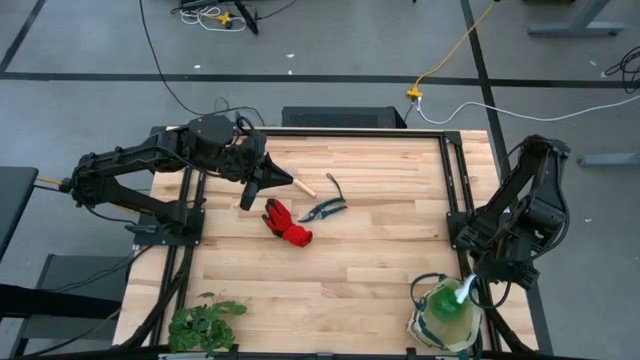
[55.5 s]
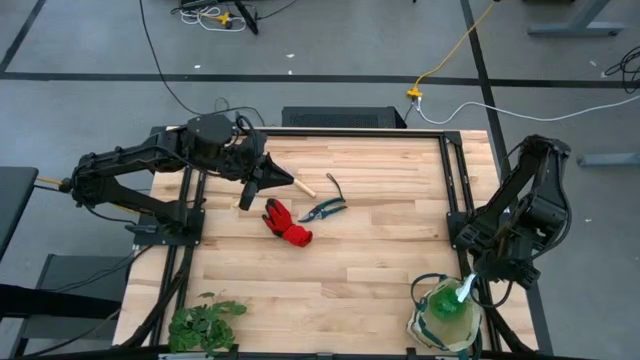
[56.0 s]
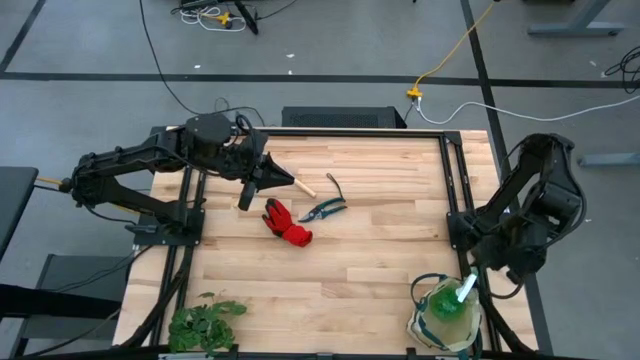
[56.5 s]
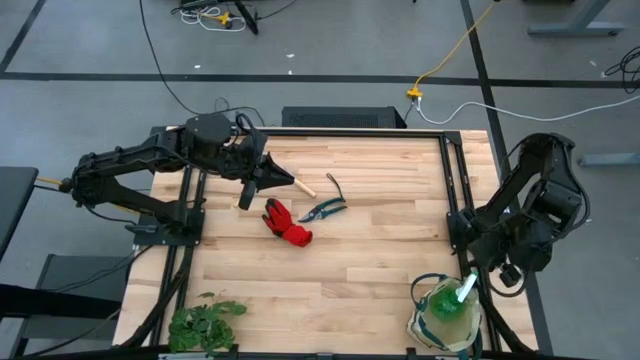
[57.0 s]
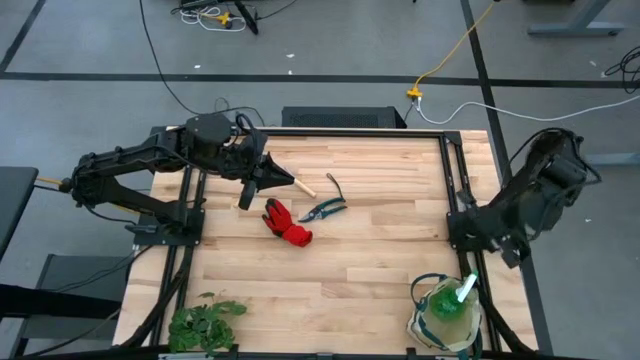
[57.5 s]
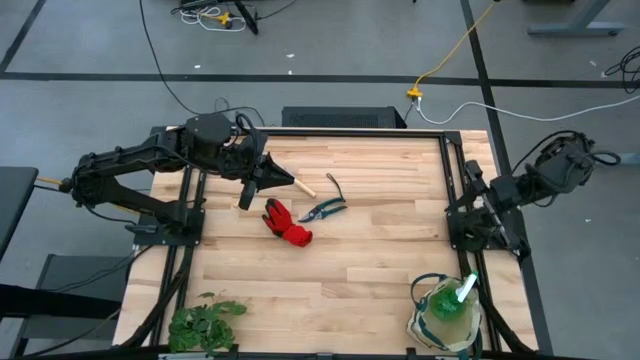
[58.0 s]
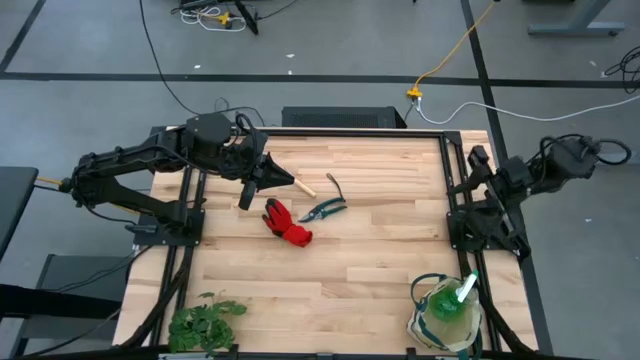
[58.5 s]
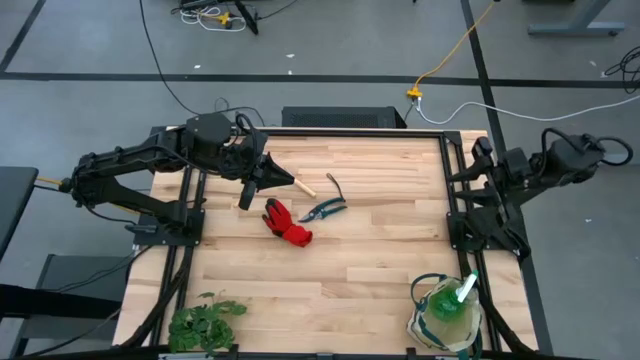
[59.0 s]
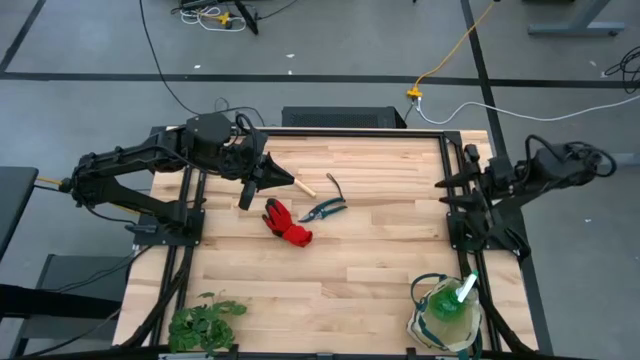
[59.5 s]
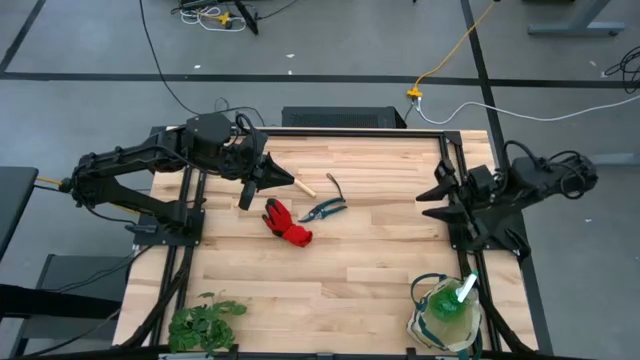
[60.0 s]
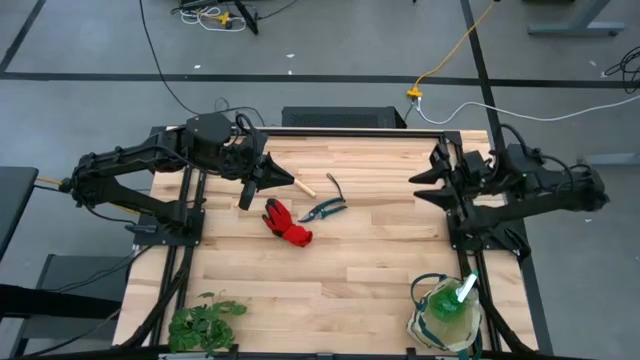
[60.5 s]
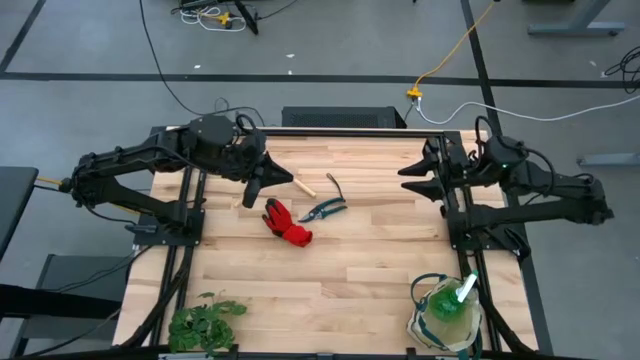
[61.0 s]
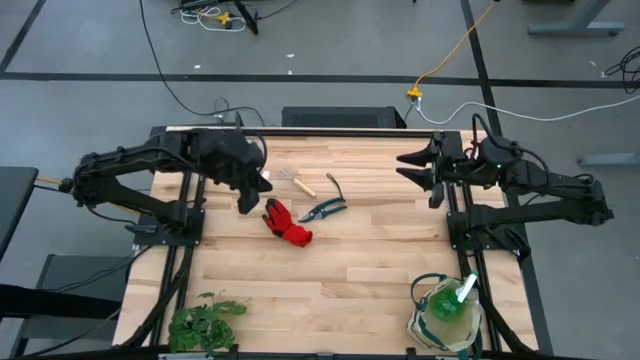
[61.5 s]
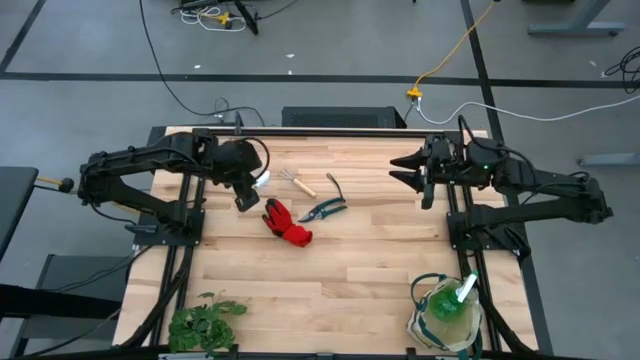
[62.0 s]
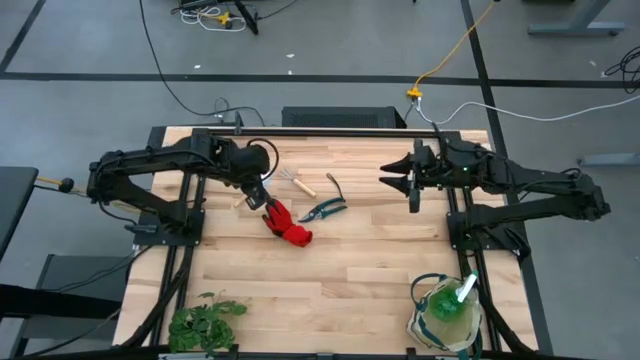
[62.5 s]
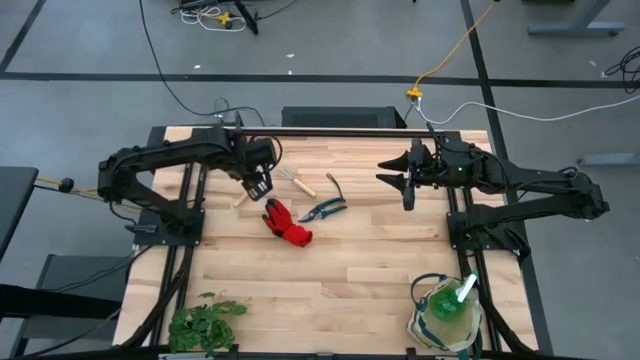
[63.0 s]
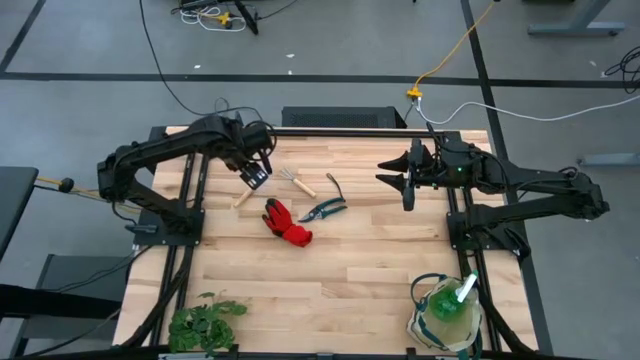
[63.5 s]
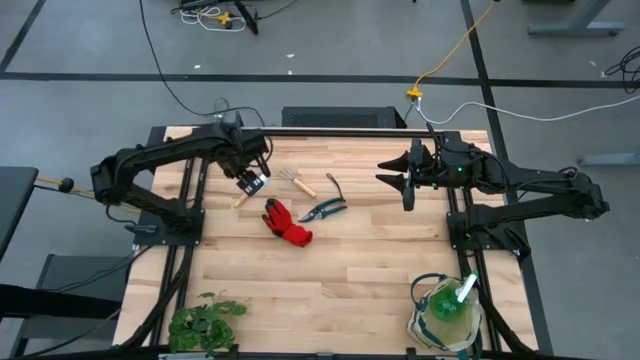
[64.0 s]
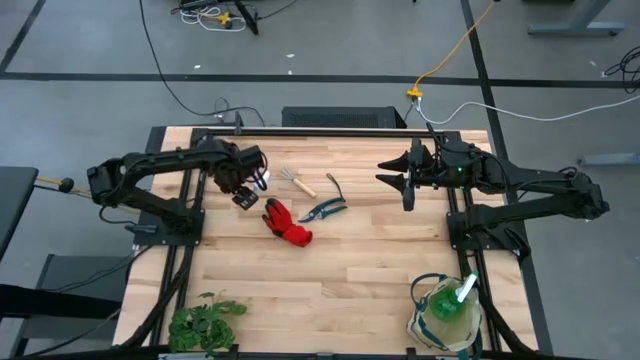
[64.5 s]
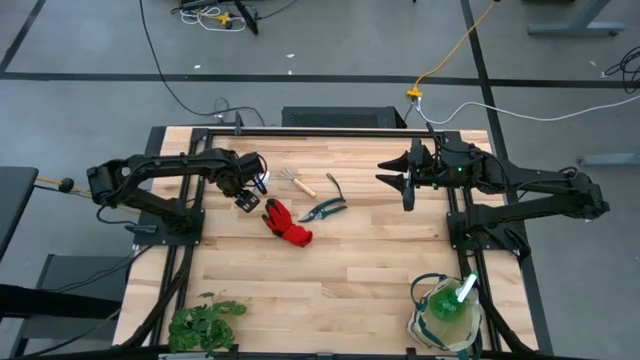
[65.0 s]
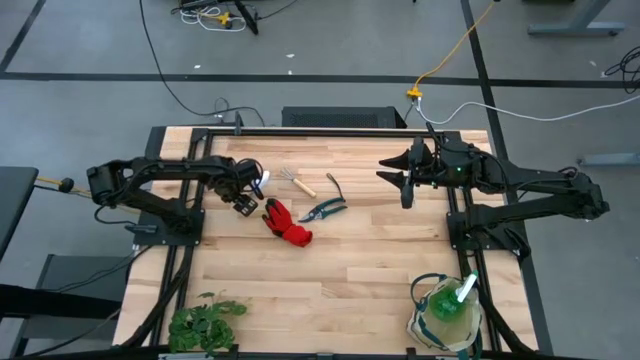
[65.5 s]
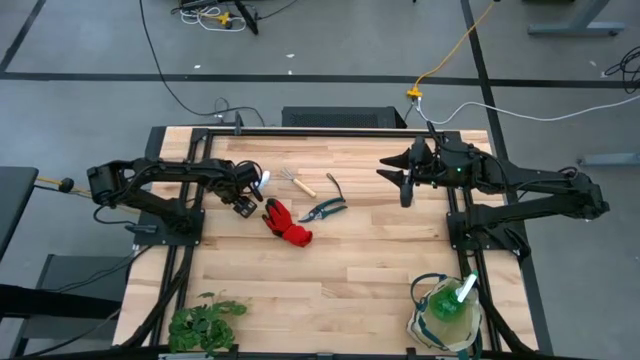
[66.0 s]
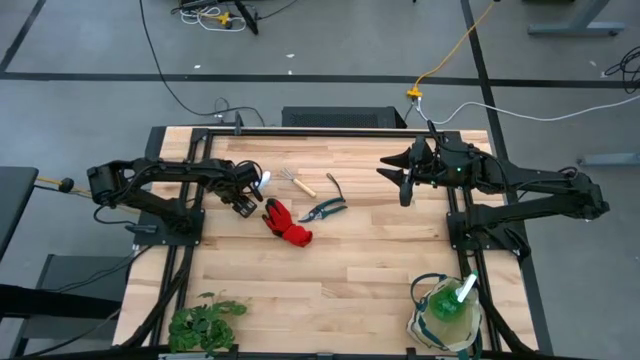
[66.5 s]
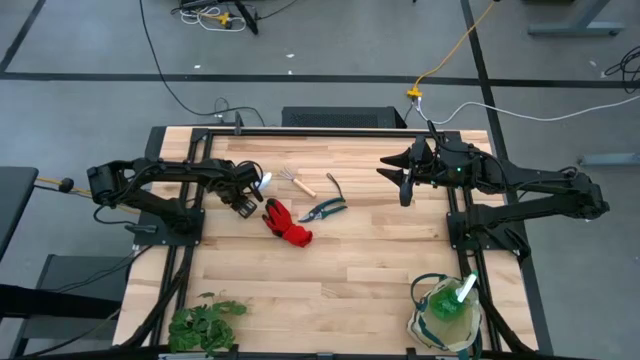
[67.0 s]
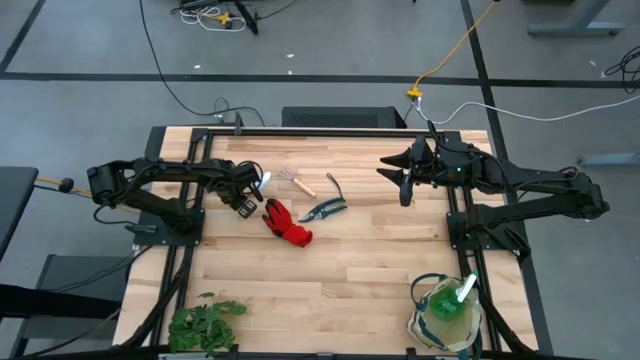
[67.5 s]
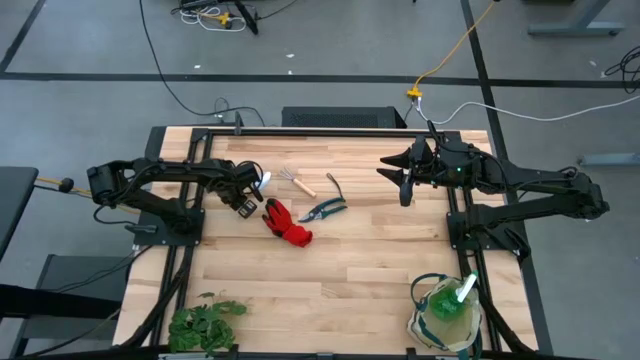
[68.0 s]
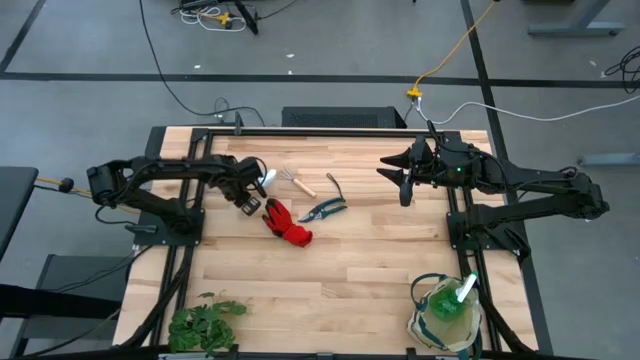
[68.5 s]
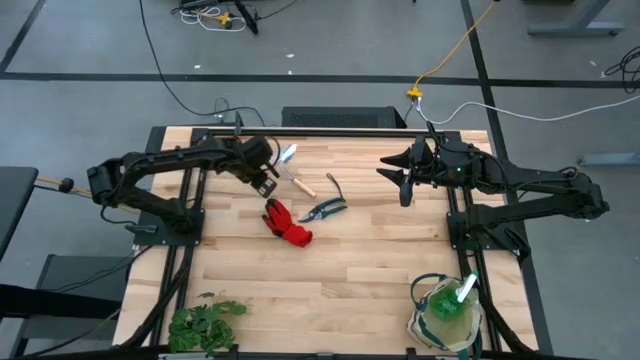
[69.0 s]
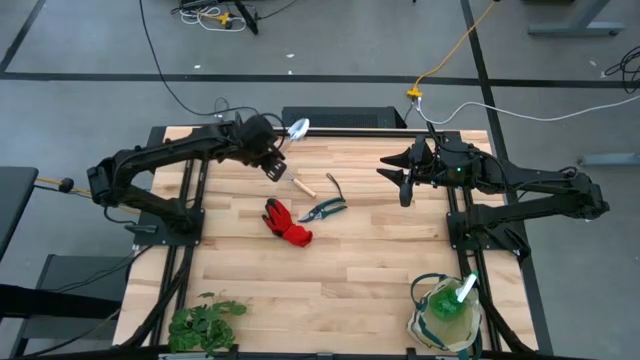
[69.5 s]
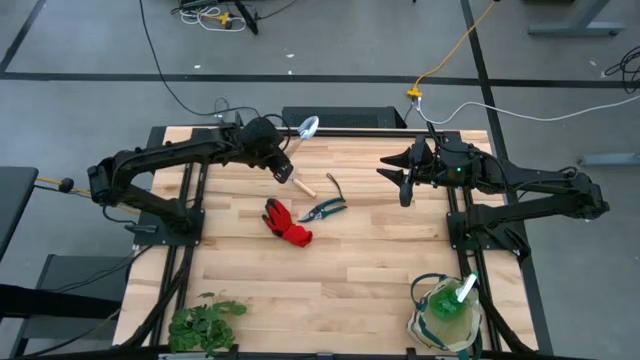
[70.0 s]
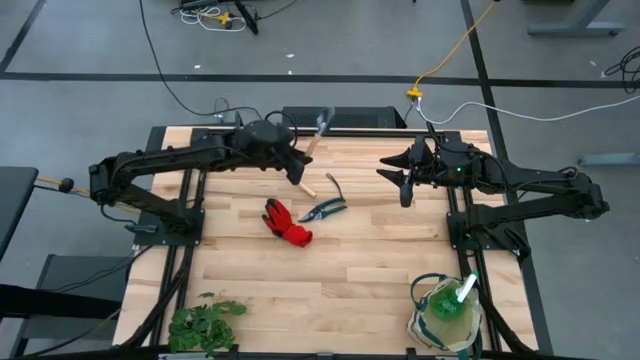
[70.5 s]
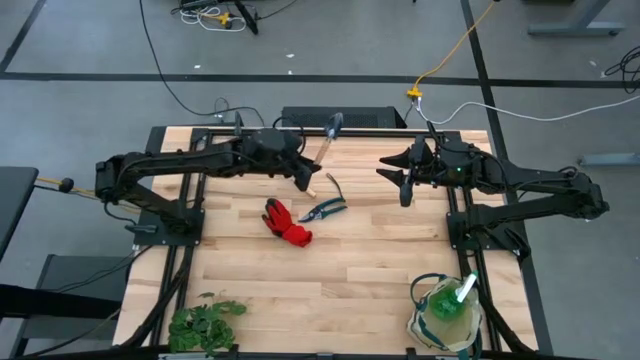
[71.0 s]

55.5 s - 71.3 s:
Task: Pick & Place Garden tools in Gardening bag
Put the trowel into the gardening bag

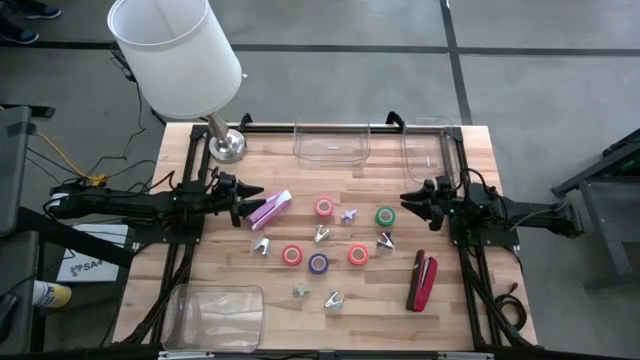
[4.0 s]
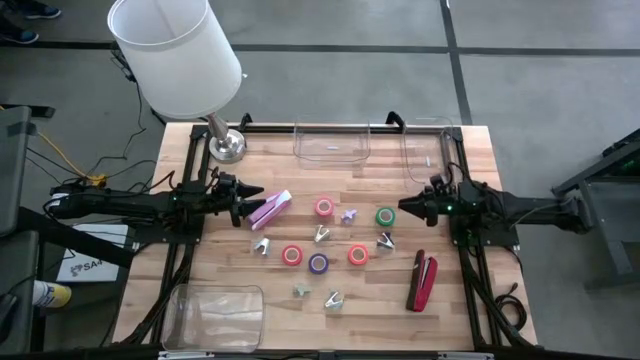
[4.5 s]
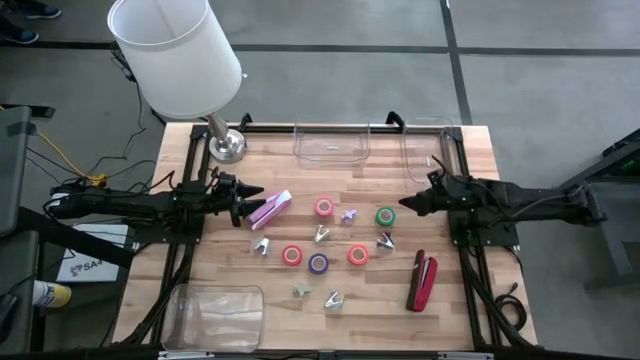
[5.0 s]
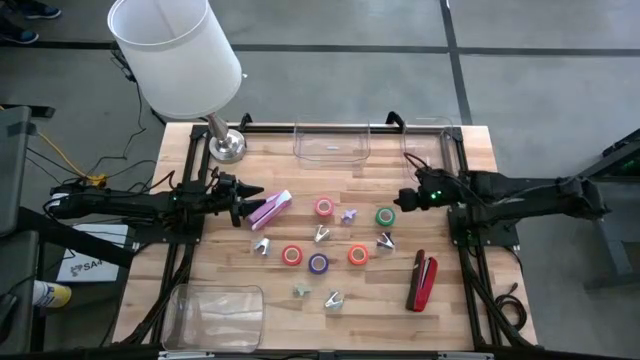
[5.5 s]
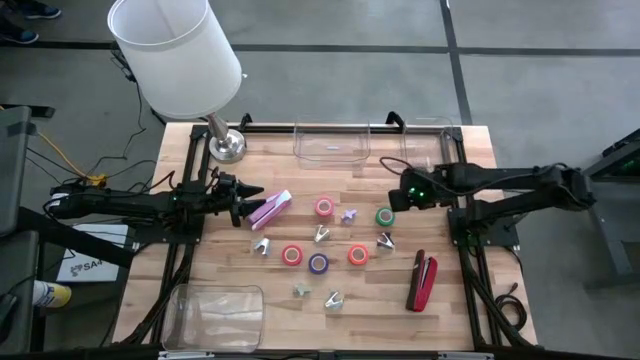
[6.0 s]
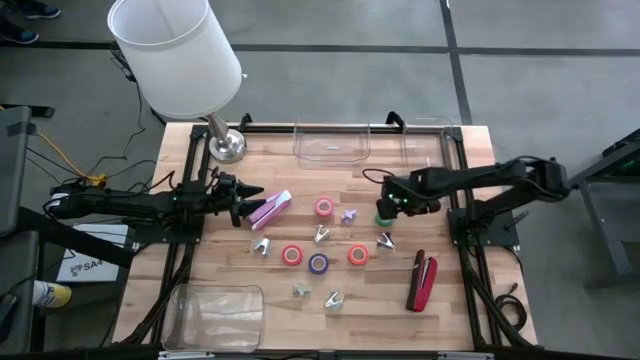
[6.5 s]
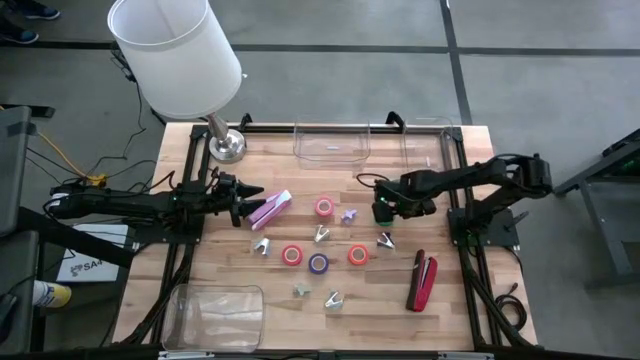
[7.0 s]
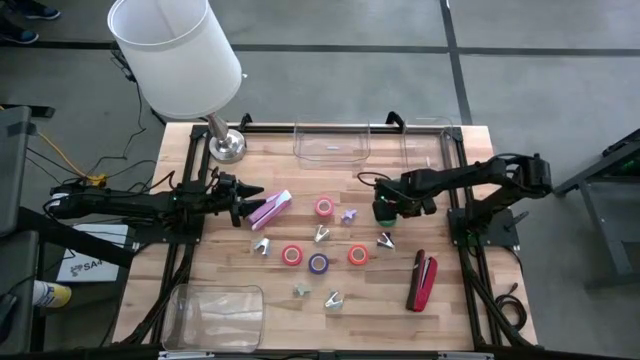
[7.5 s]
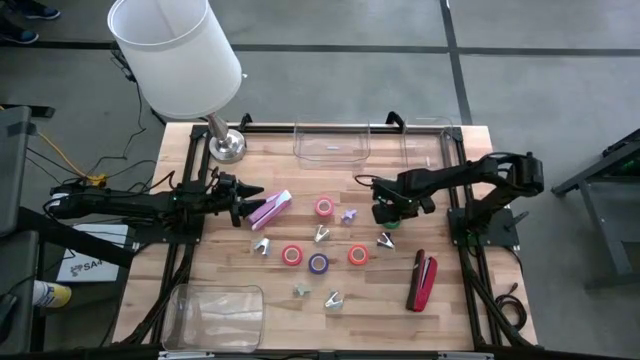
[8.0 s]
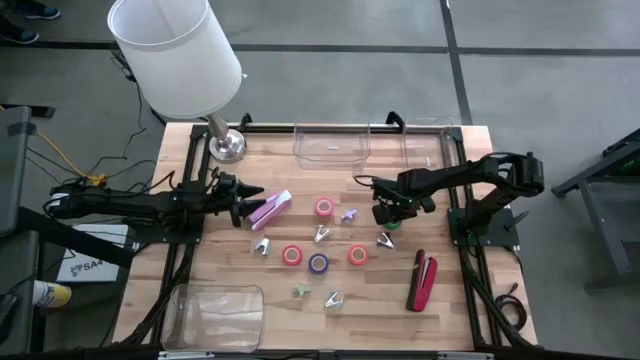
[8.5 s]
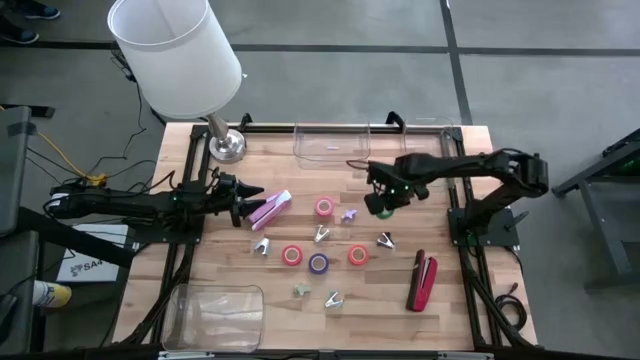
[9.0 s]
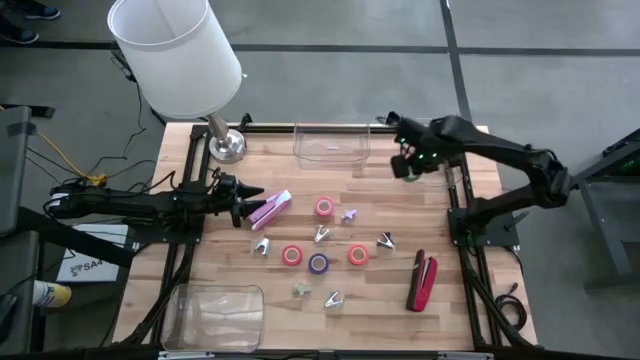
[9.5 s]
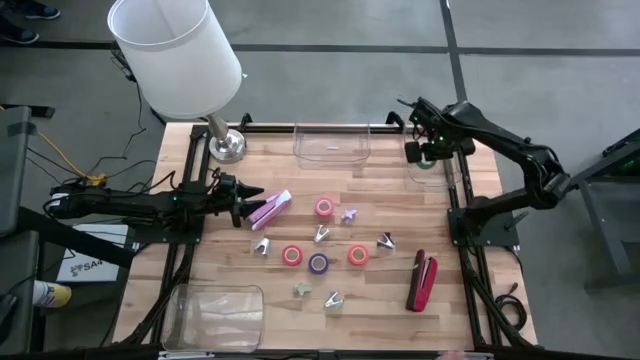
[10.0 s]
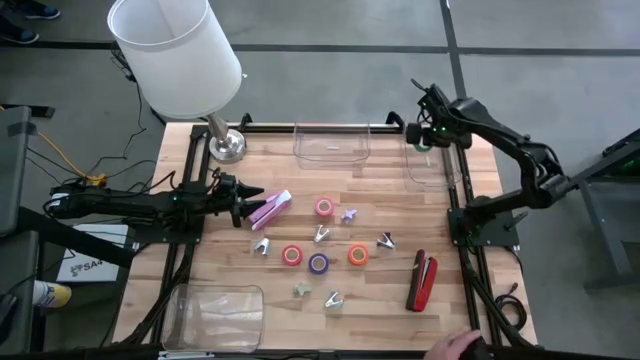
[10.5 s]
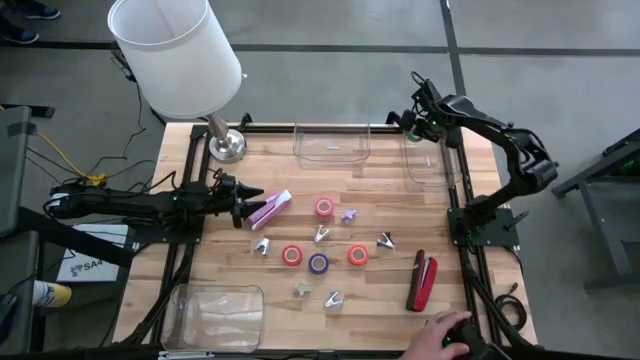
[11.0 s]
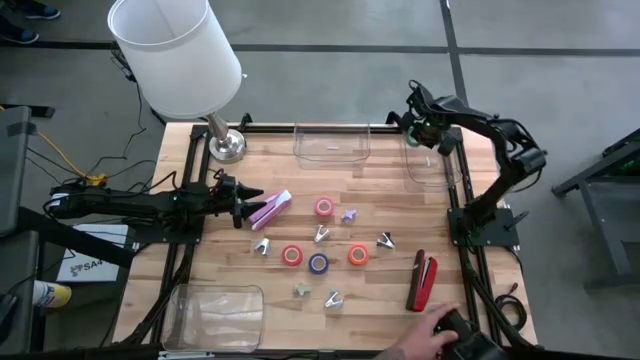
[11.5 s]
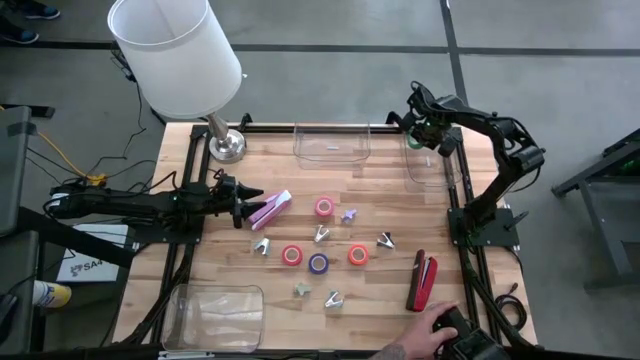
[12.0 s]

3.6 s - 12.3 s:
Task: Pick and place Stapler, Stapler remover, tape
Put the green tape into the top right transparent bin
